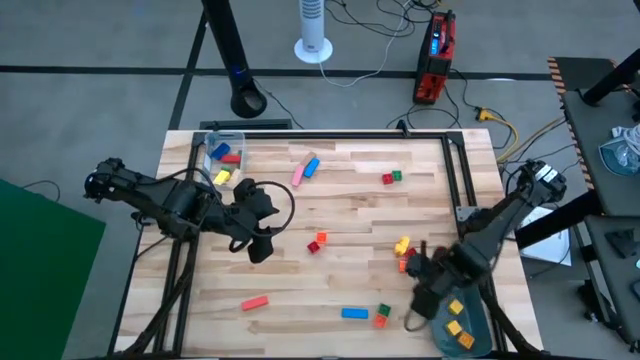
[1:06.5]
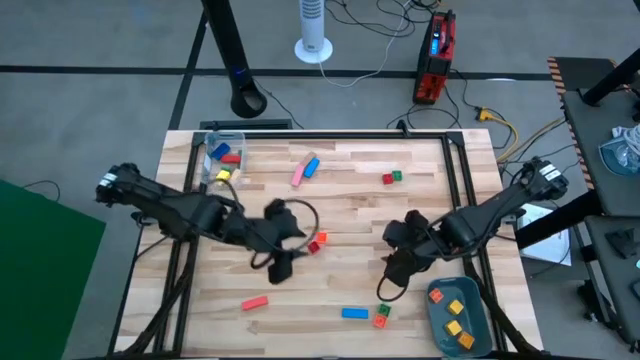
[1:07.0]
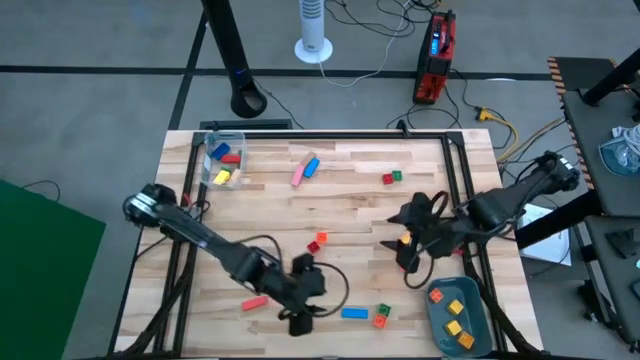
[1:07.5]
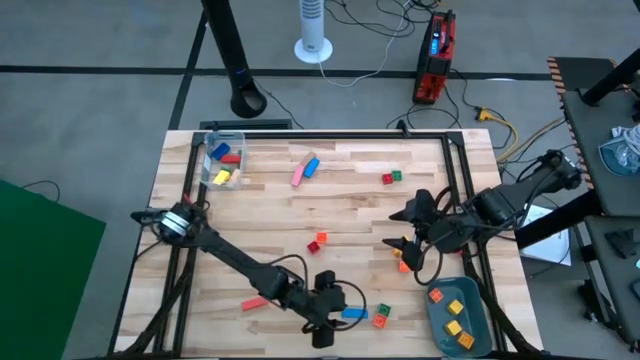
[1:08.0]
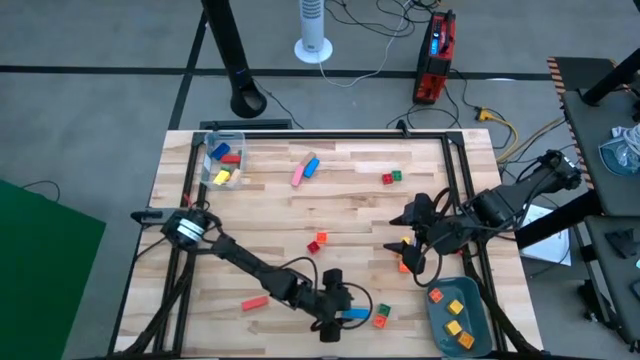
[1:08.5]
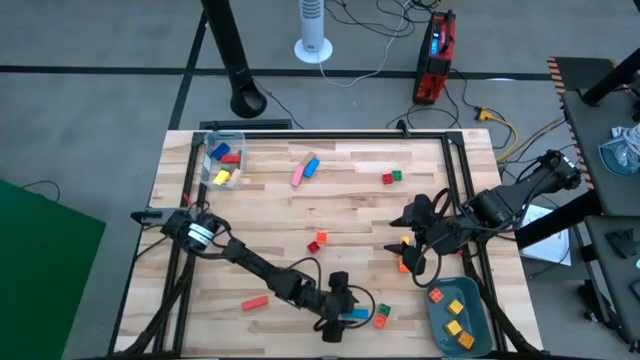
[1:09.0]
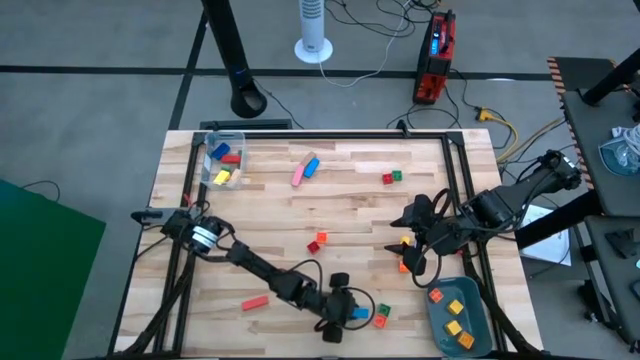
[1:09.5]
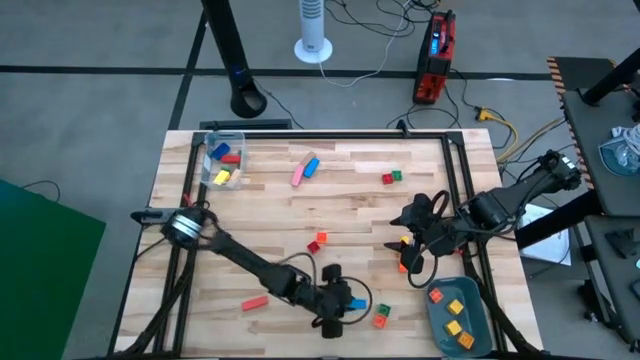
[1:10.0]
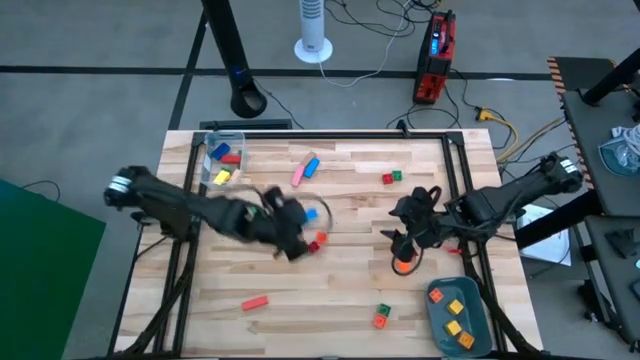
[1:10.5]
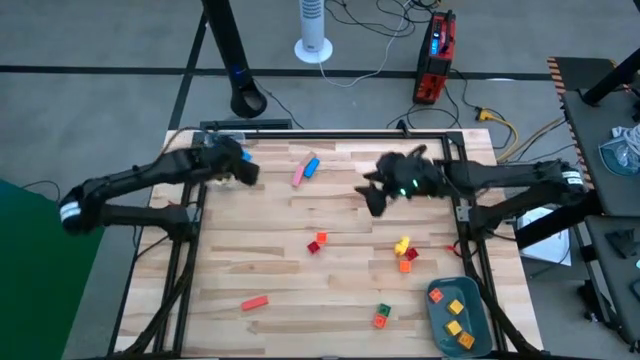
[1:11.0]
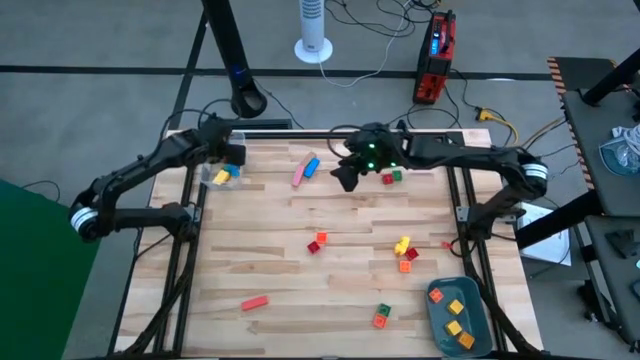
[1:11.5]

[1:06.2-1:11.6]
Task: Sort blocks by size
Put the blue rectangular wooden block into the transparent bin

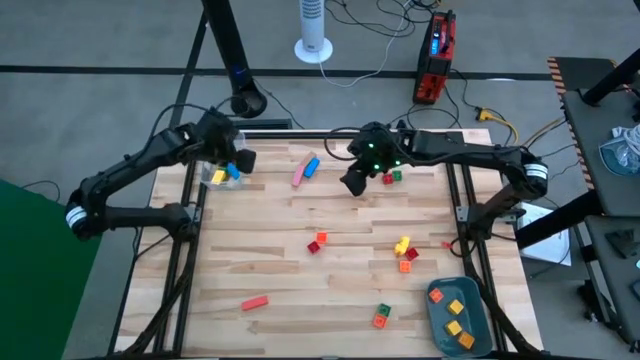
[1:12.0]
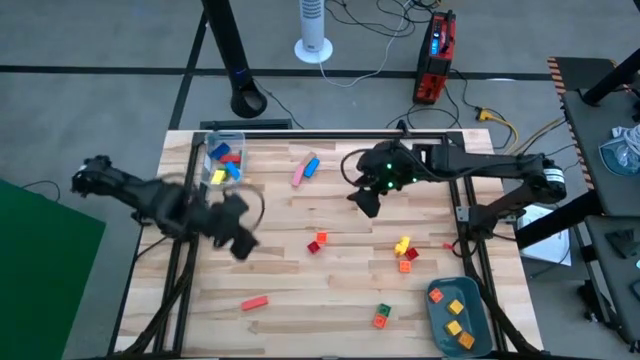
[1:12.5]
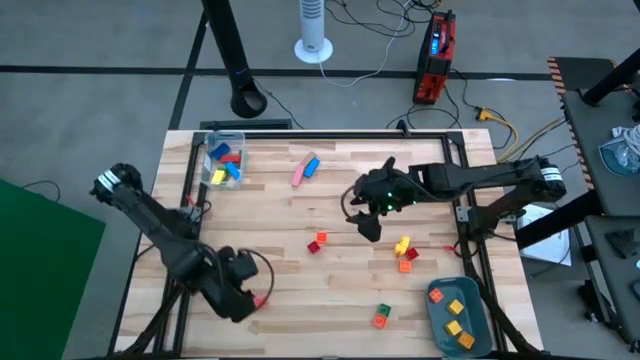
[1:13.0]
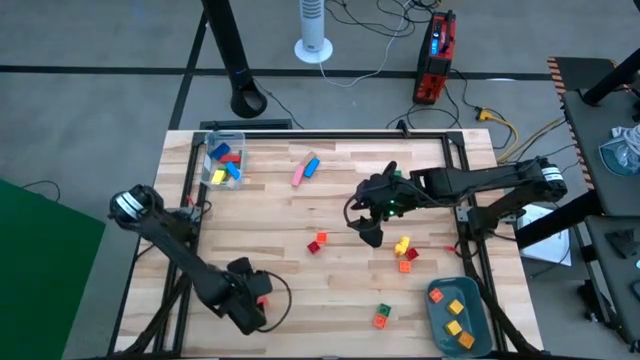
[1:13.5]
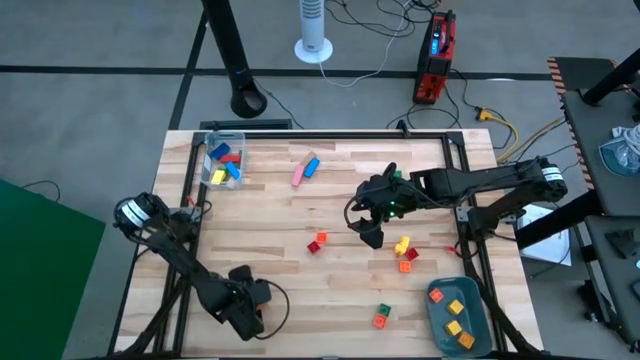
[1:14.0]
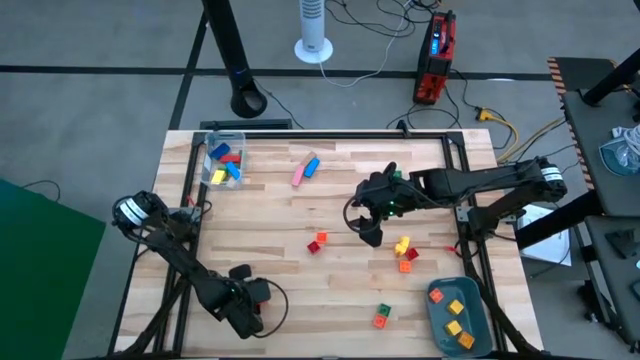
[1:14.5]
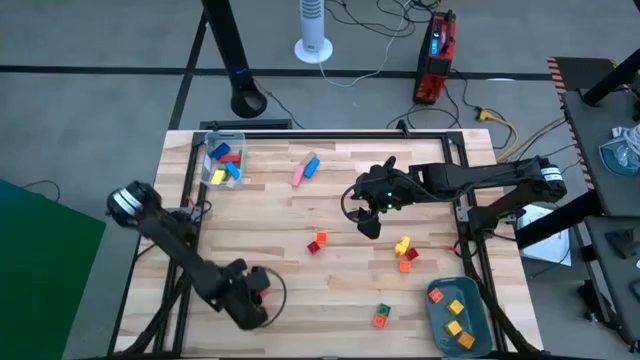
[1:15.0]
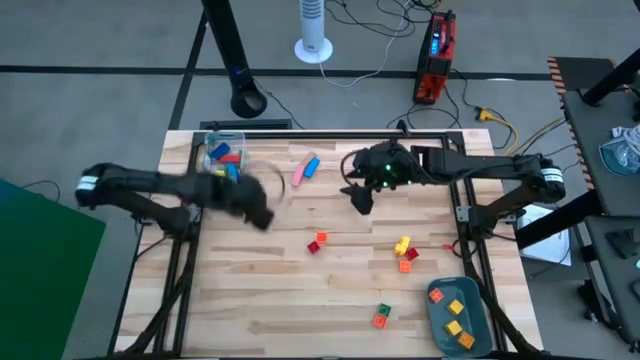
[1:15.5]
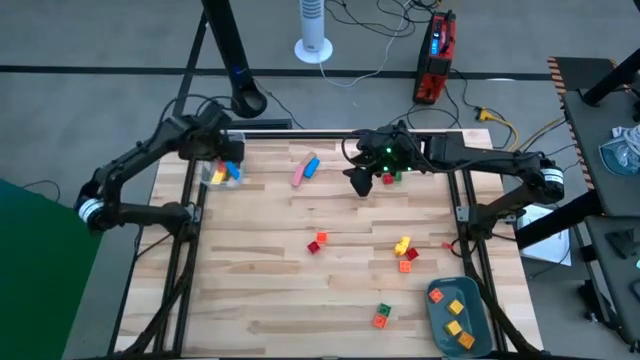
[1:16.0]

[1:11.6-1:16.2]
Put the orange rectangular wooden block into the transparent bin

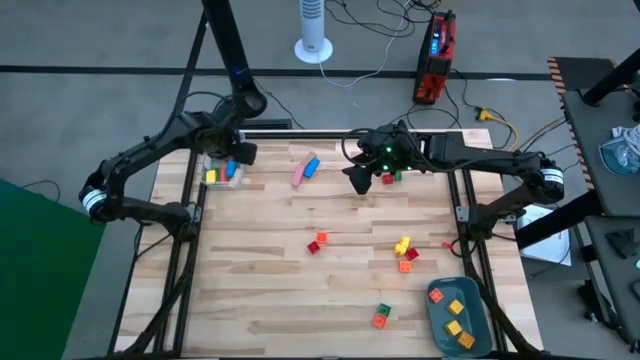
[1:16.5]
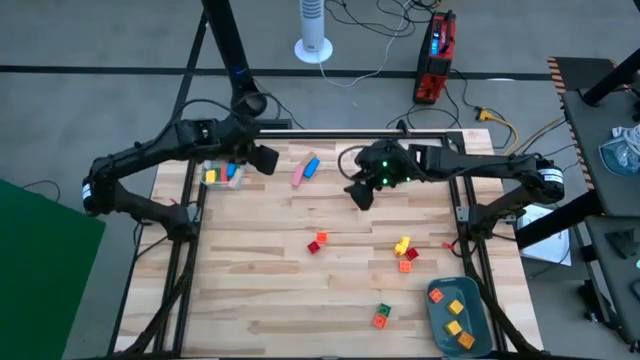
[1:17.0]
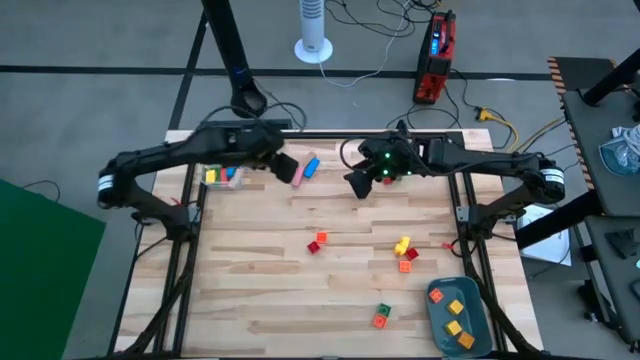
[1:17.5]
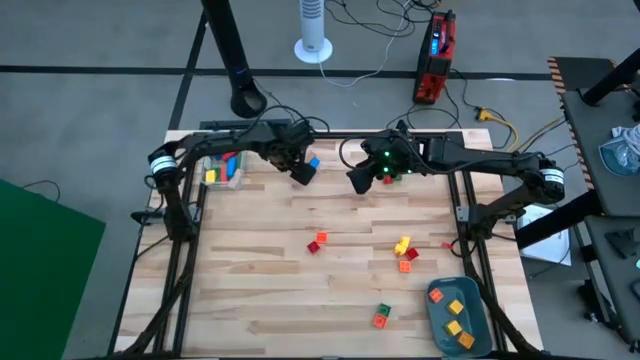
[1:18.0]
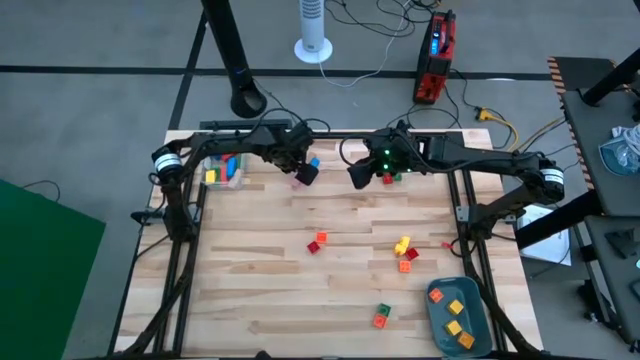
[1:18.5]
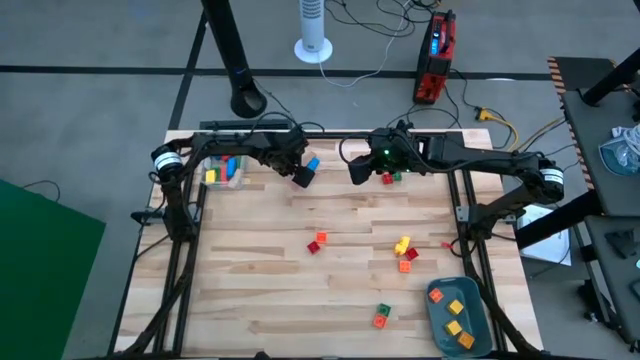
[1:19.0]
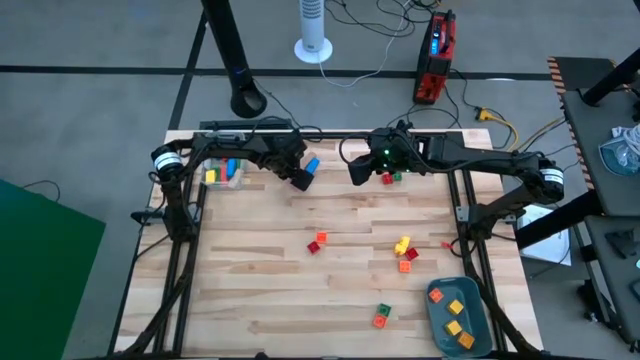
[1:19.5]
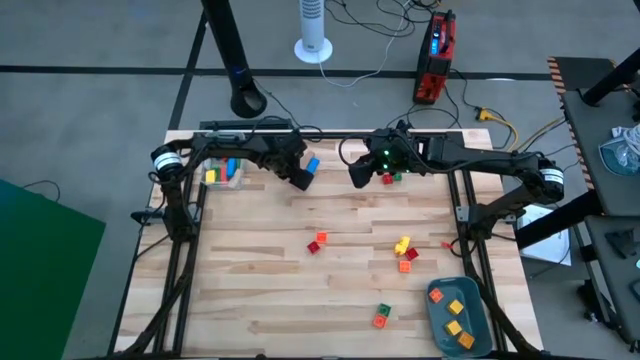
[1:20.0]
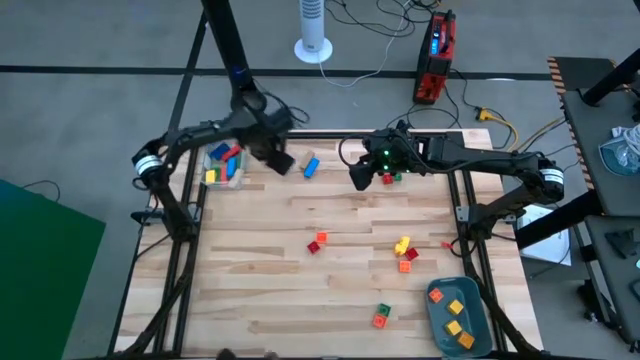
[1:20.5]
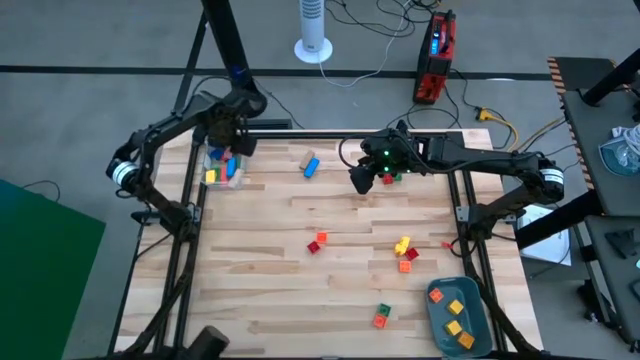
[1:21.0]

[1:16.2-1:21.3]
Put the pink rectangular wooden block into the transparent bin

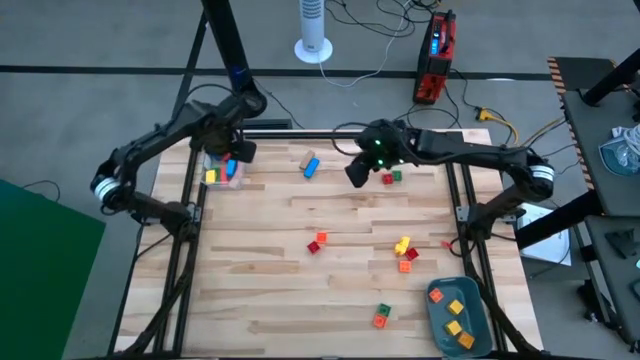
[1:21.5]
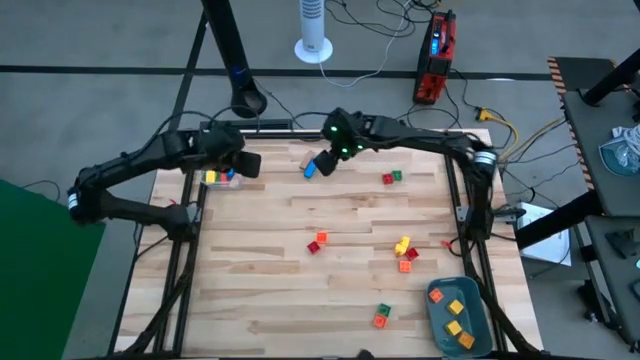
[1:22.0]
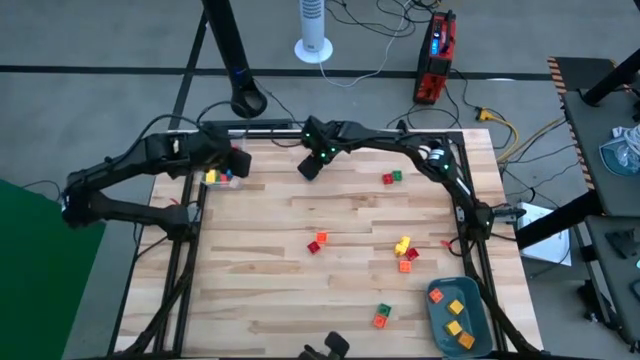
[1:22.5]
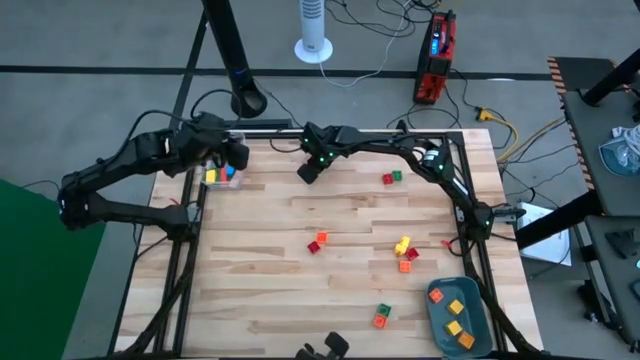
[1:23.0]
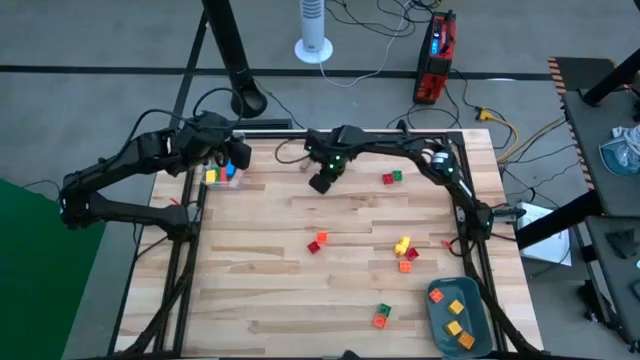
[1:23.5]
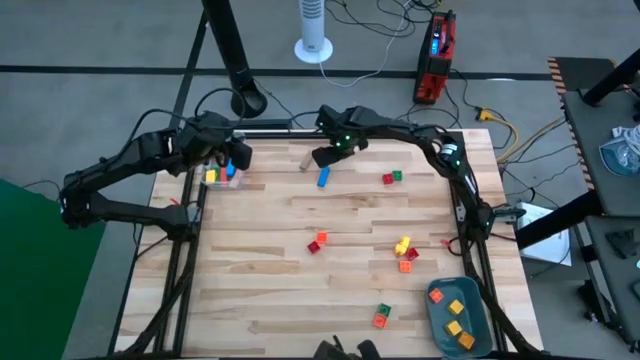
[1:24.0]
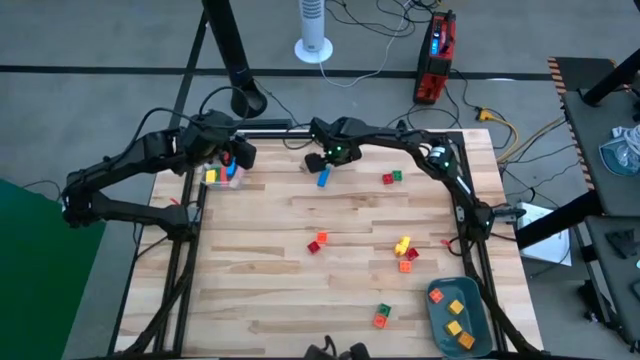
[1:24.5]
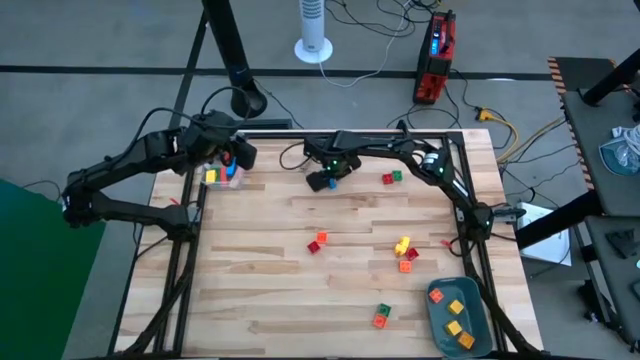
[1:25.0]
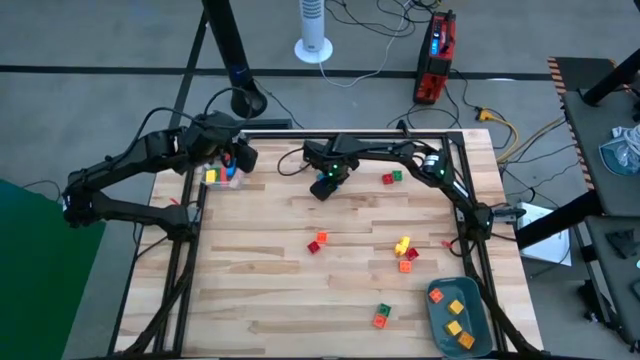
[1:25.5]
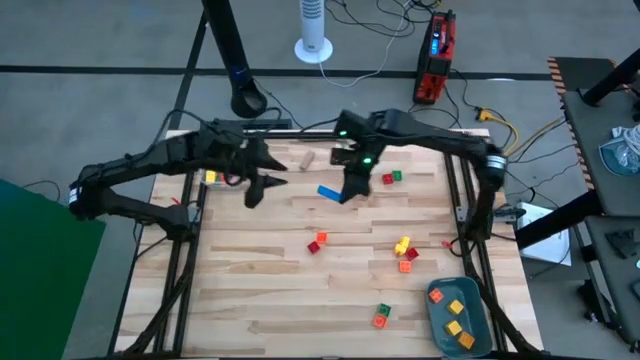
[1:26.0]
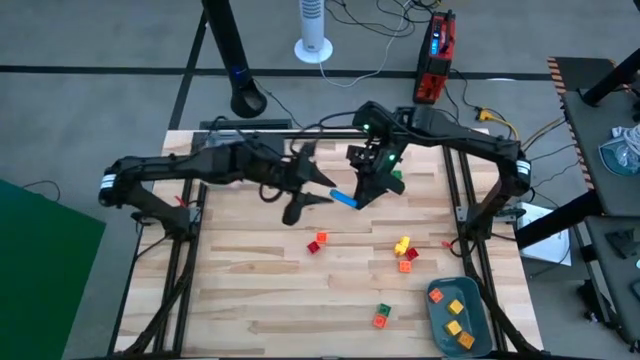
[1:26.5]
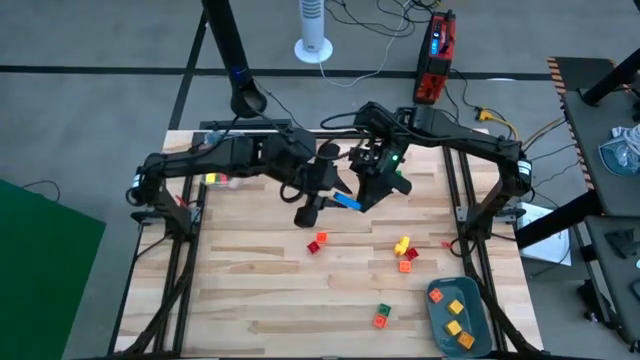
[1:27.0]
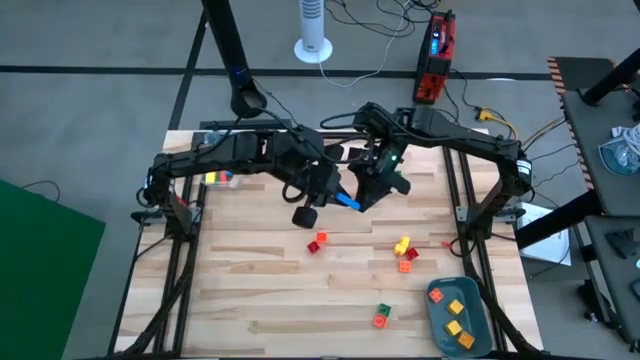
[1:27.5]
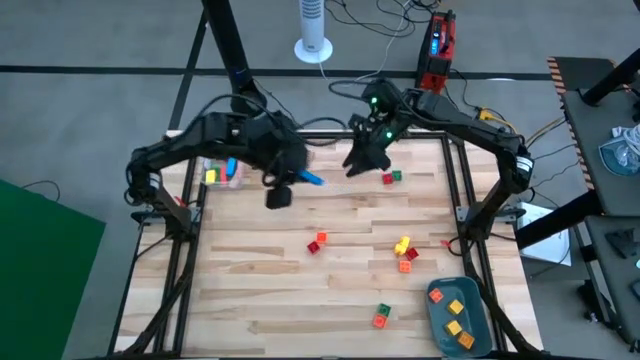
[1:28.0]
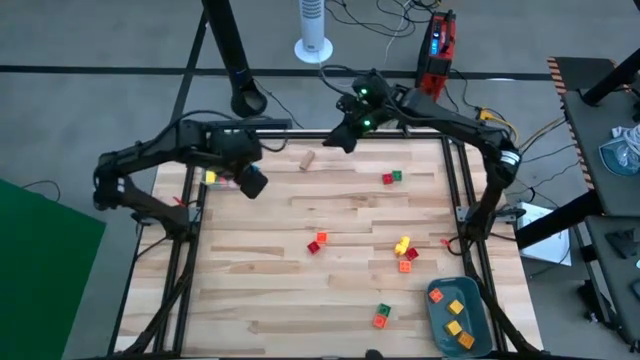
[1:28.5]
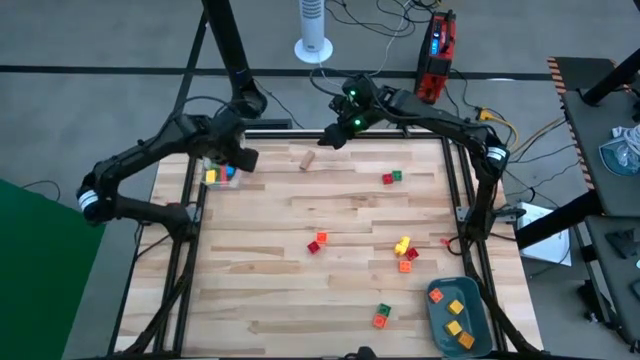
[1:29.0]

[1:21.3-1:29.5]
Put the blue rectangular wooden block into the transparent bin
